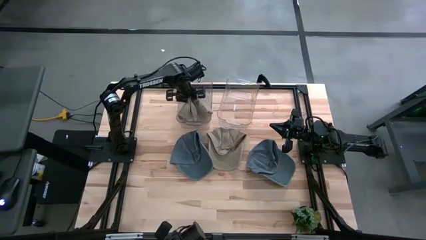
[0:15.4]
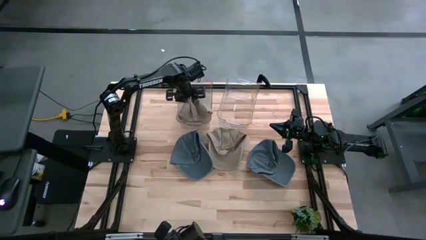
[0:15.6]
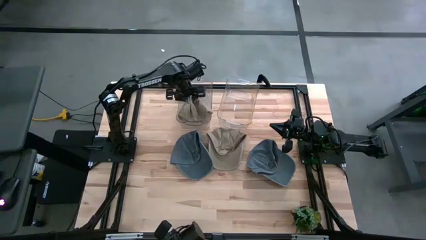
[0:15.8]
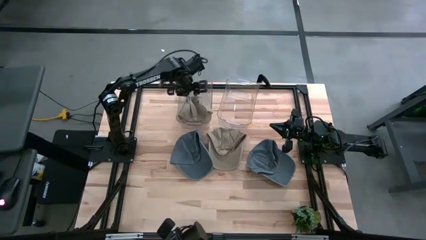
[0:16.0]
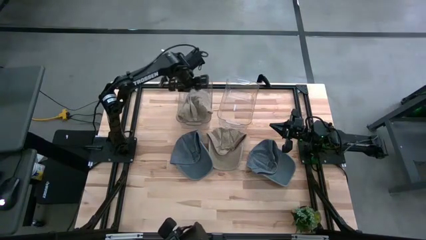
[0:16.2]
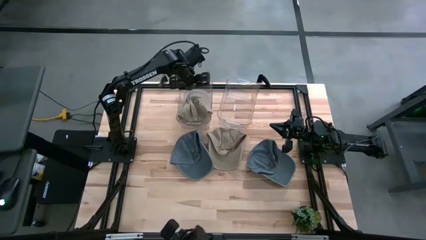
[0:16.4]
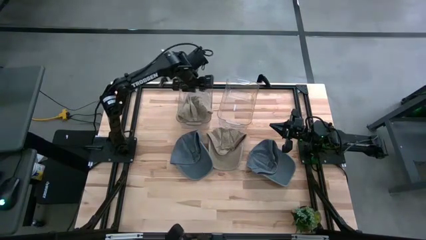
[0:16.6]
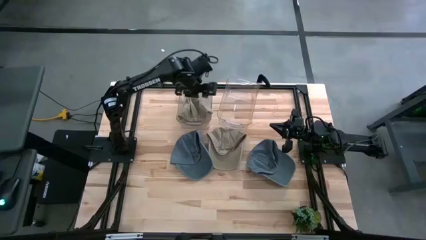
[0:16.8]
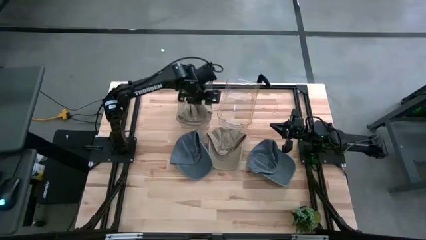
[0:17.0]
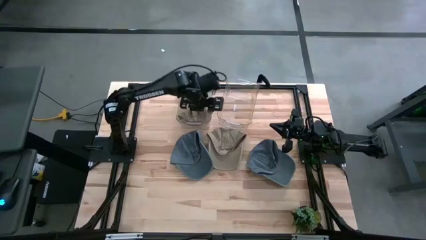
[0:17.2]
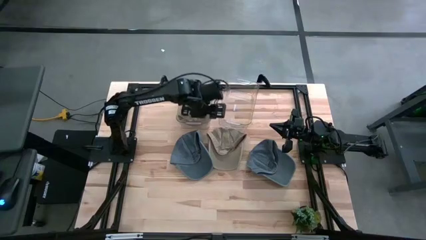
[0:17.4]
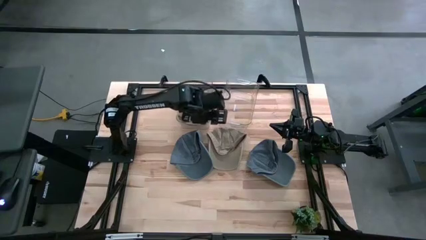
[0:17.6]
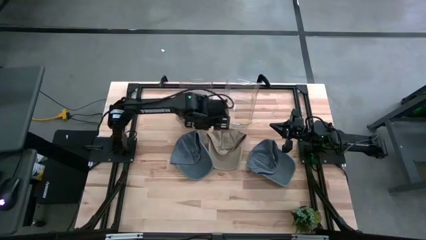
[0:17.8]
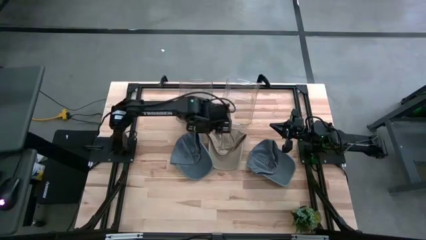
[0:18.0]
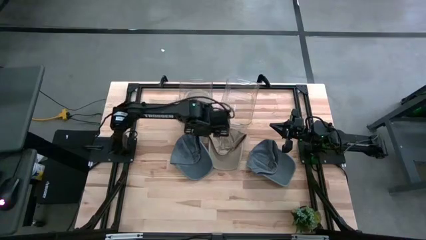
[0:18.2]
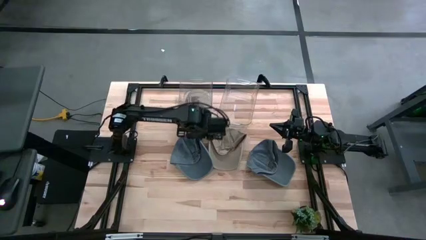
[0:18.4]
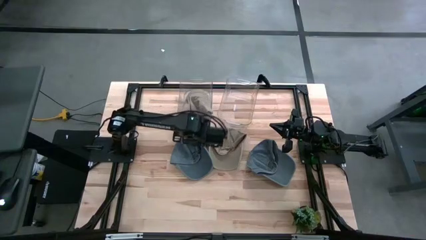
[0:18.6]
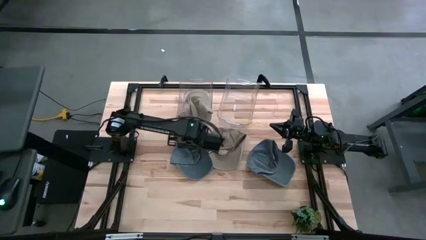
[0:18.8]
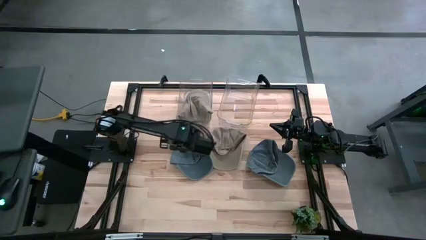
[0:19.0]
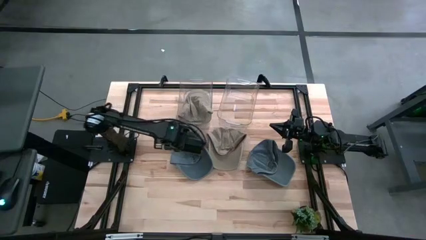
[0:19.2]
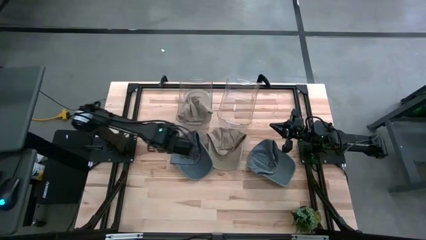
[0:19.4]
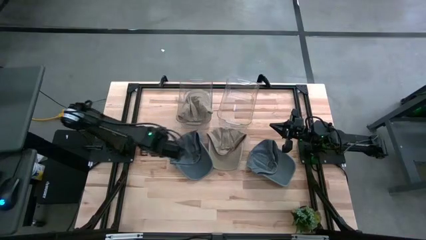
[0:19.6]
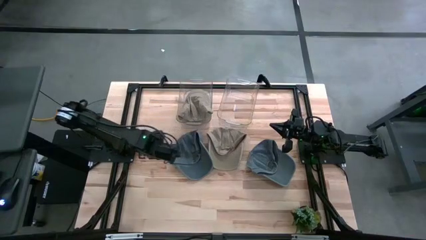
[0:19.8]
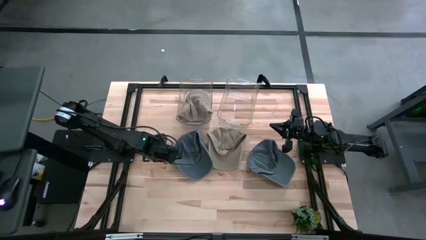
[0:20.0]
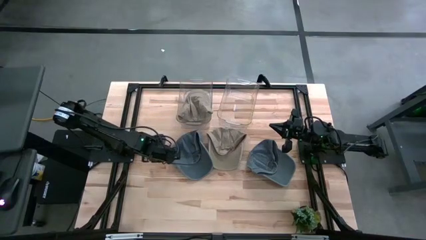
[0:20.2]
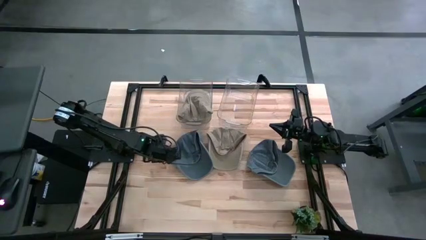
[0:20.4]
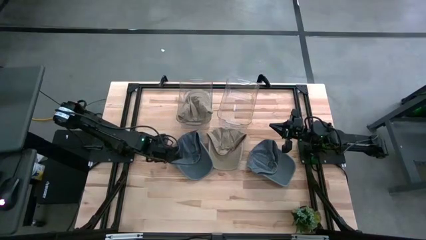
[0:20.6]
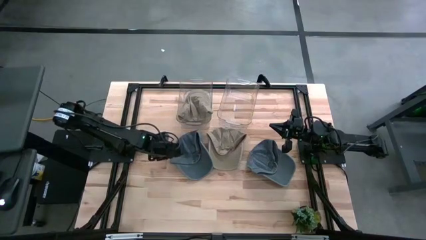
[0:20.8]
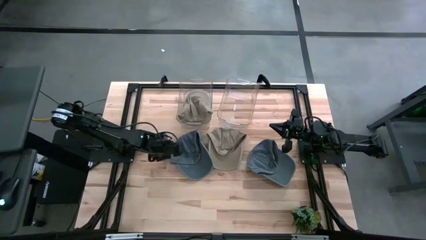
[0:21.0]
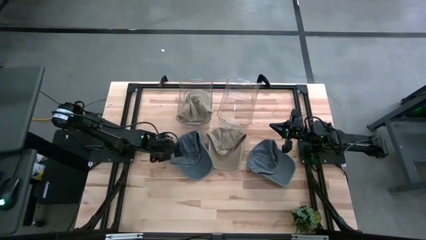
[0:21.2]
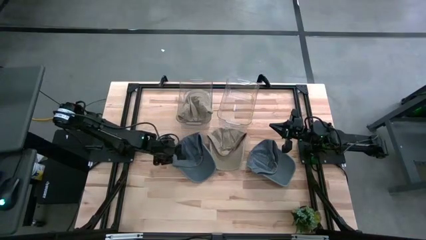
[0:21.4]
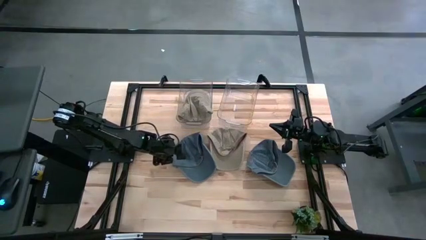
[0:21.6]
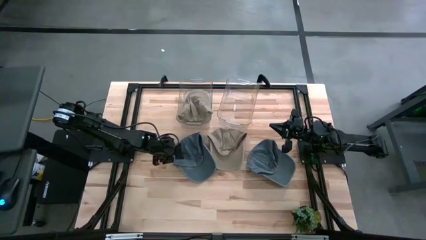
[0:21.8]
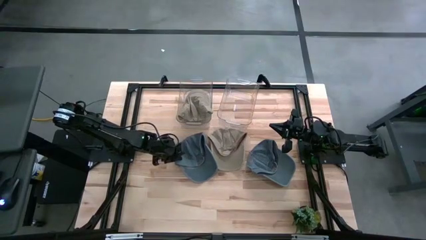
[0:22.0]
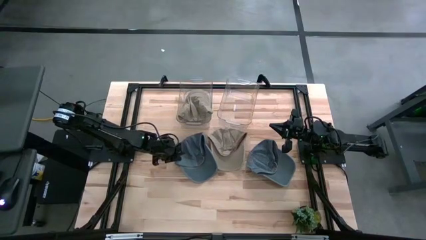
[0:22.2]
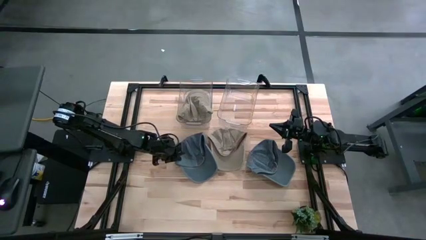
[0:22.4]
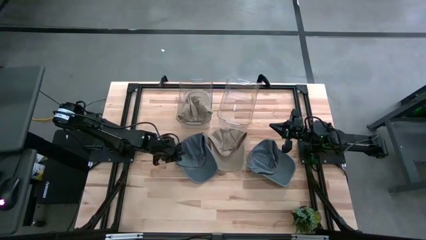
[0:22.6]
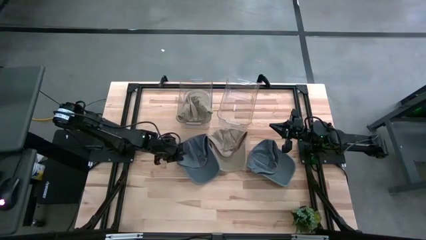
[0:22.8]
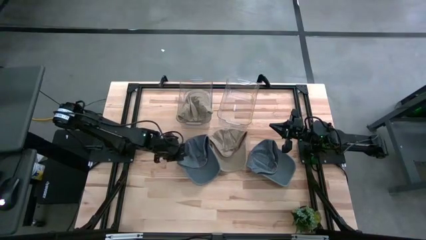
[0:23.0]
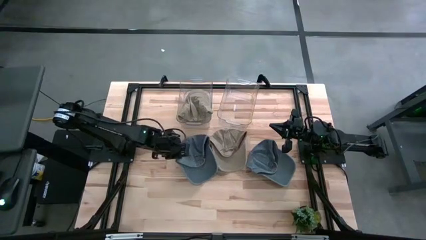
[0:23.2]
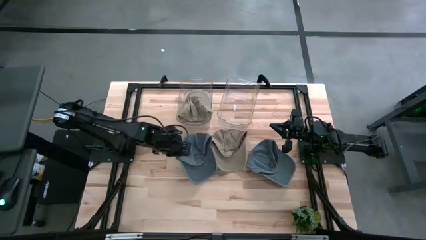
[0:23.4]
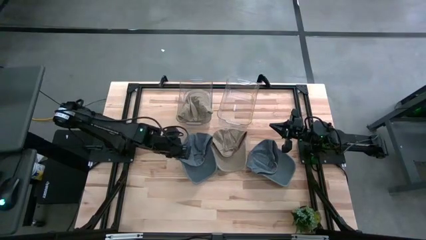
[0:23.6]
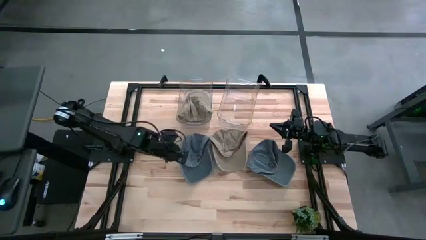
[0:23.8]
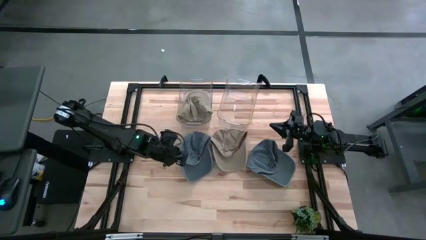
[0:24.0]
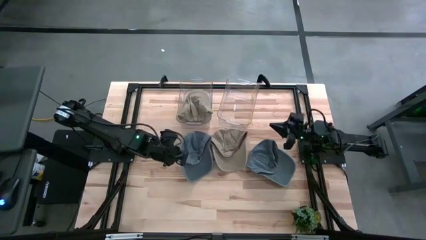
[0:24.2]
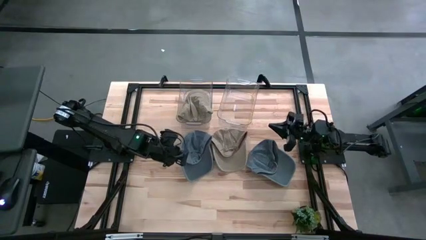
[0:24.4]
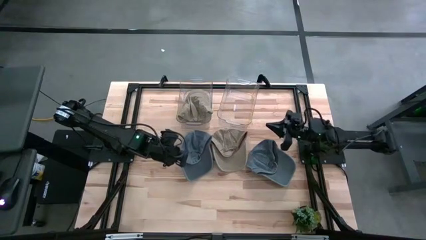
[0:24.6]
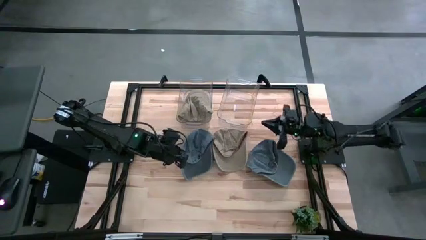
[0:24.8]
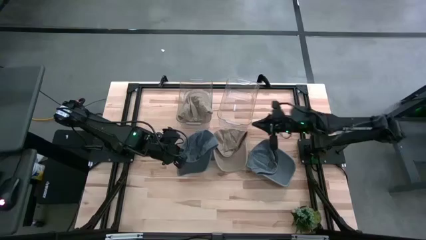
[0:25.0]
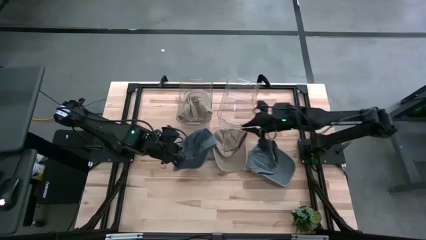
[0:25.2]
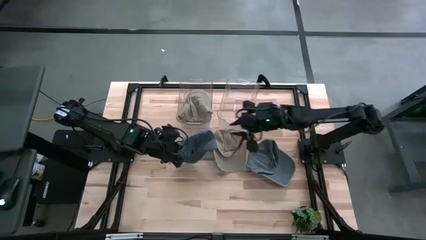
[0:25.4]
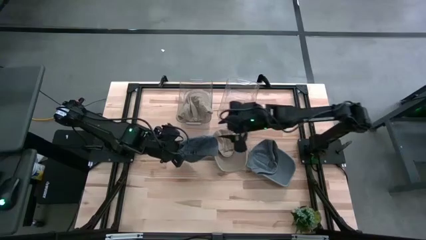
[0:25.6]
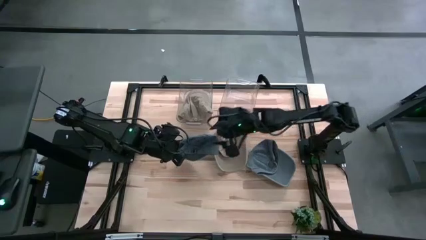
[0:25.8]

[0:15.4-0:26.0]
Task: Pick & Place hat
Put the left blue cap into the right transparent bin
